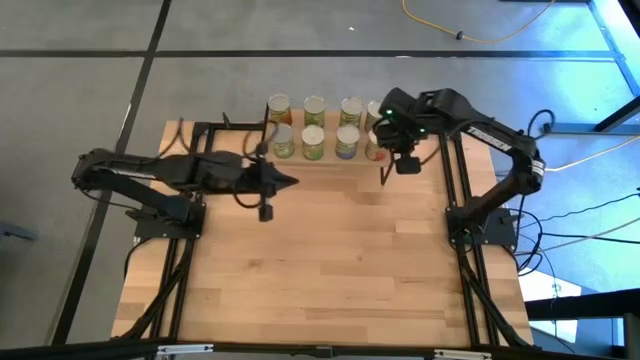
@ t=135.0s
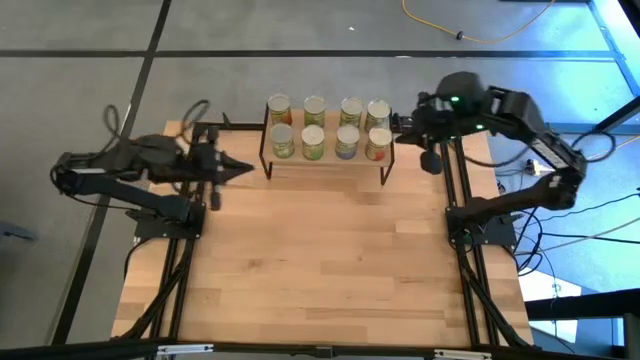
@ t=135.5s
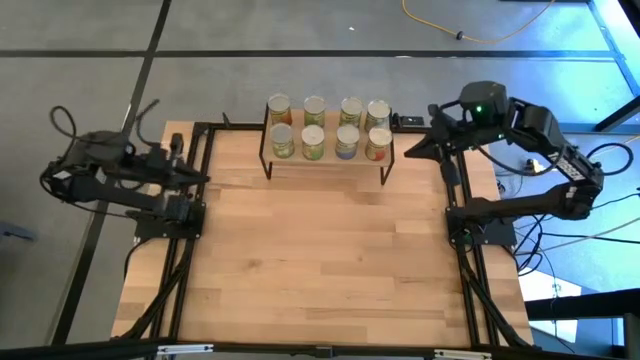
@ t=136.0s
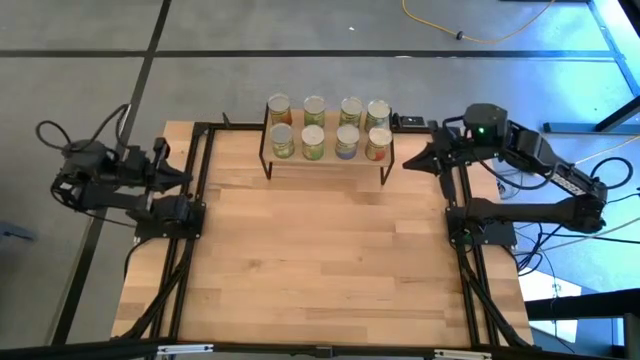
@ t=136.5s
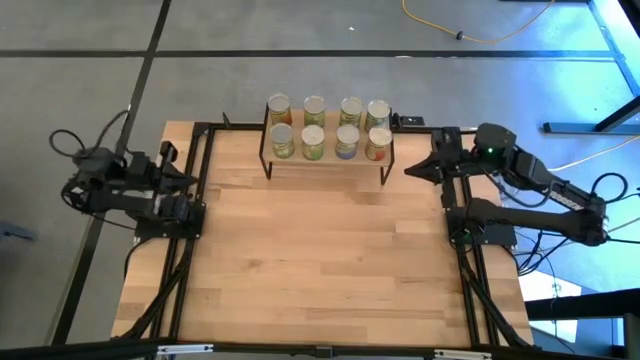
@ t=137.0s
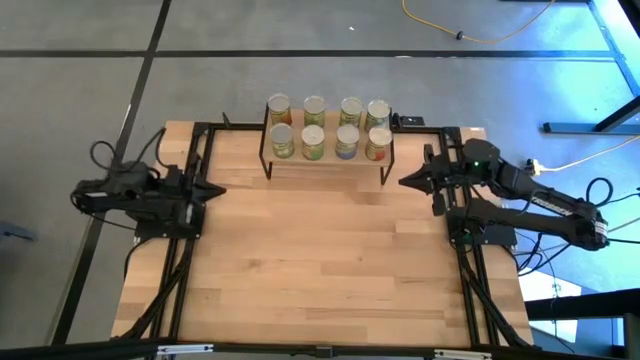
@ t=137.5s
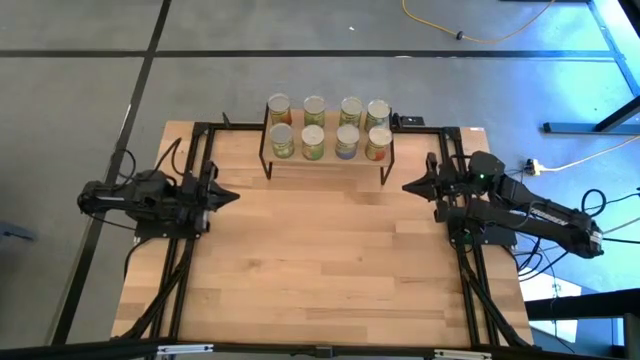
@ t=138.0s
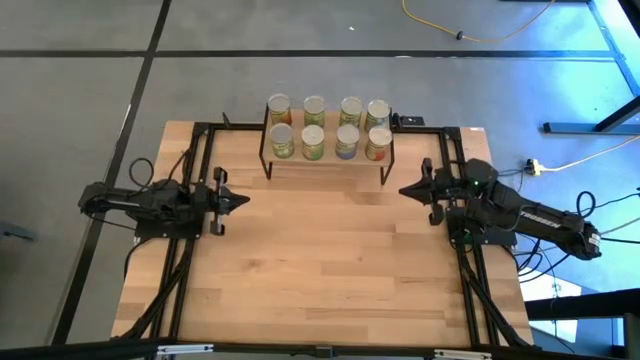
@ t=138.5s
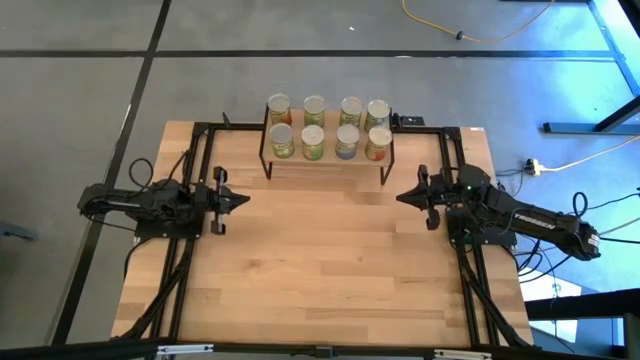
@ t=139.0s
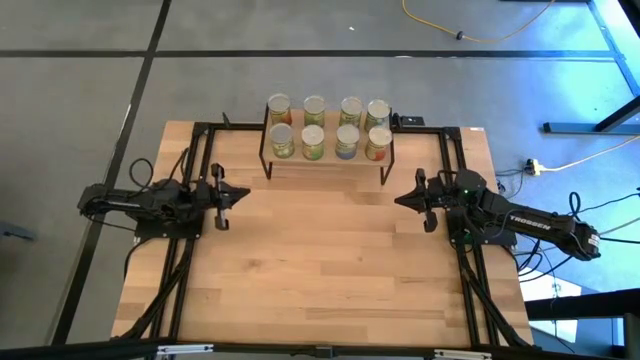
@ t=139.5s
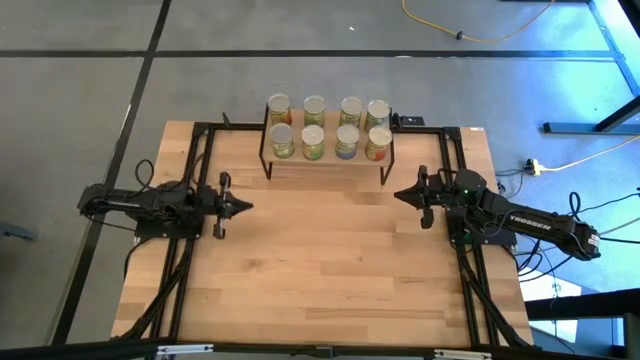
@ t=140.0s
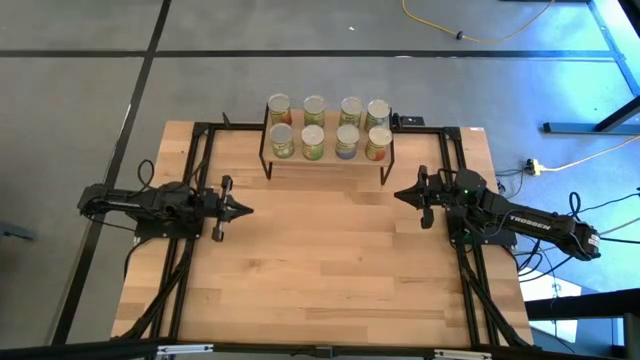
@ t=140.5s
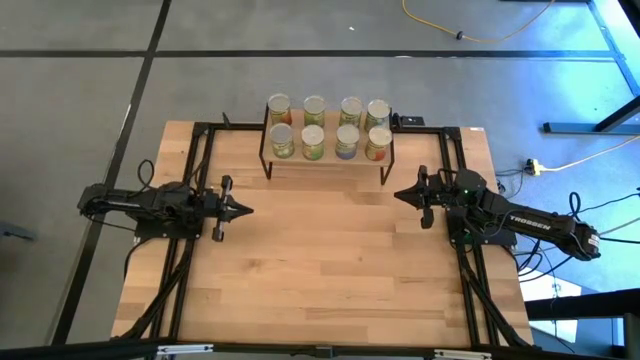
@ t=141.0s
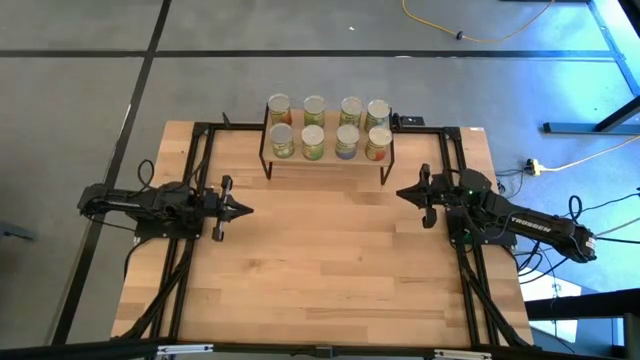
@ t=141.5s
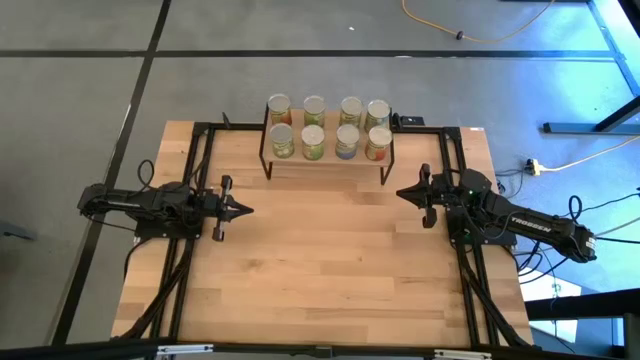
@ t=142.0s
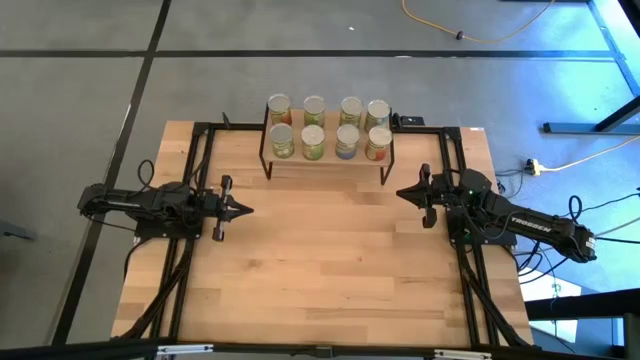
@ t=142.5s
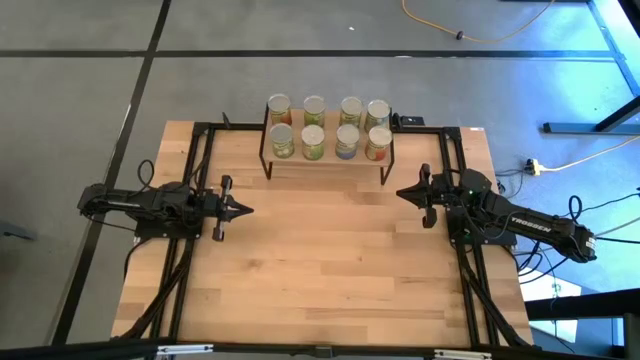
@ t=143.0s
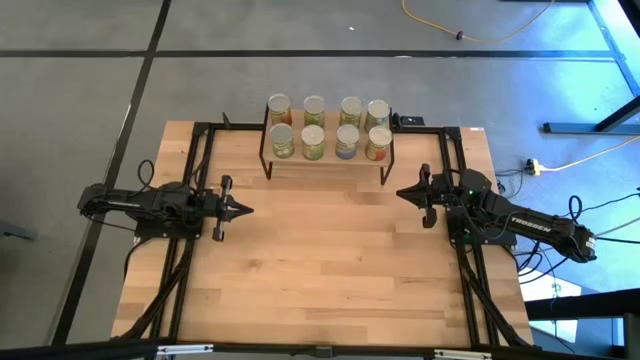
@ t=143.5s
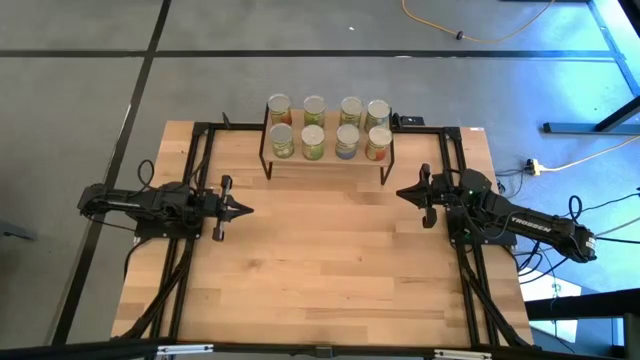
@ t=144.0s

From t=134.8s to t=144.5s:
Task: Pick and place cans onto a shelf
Return to Home Position

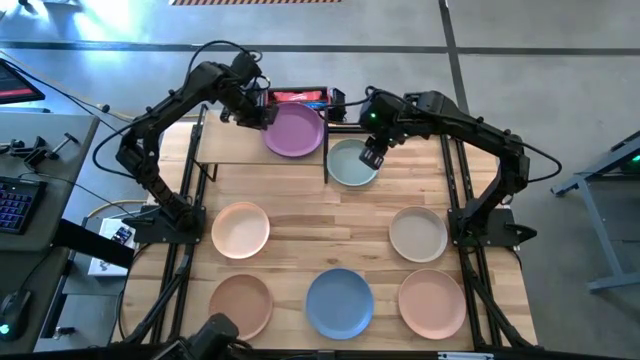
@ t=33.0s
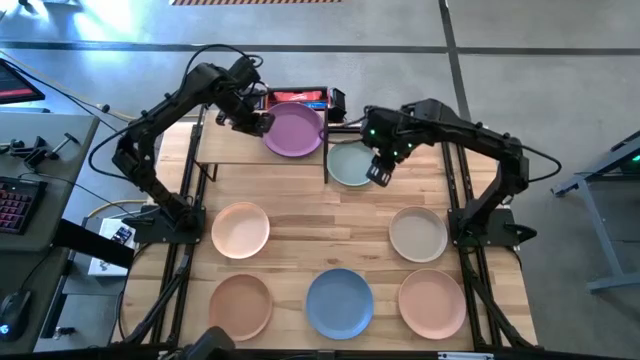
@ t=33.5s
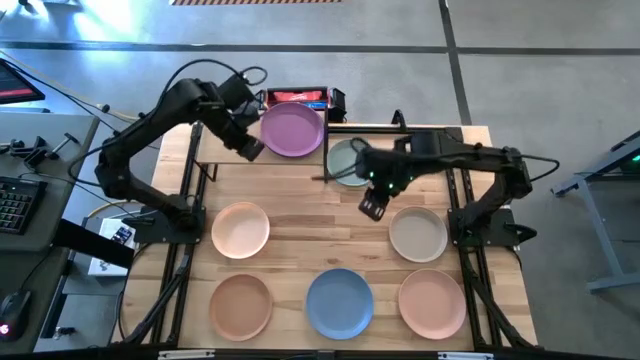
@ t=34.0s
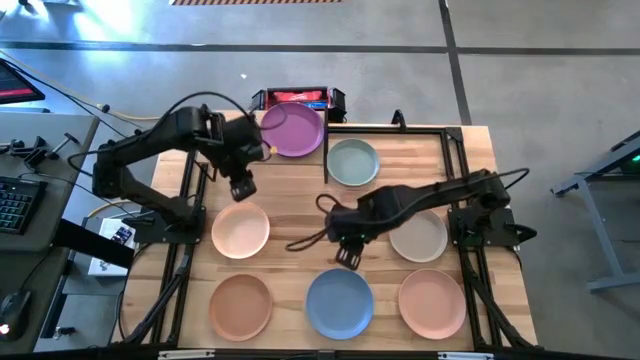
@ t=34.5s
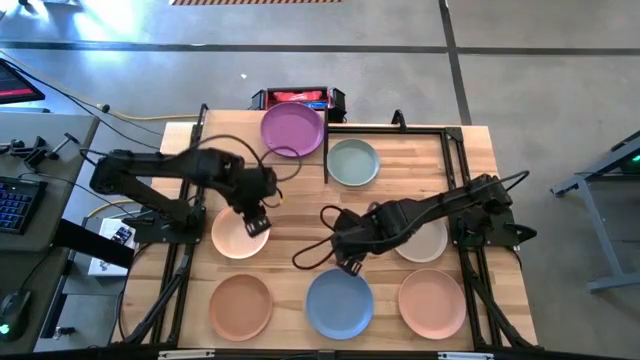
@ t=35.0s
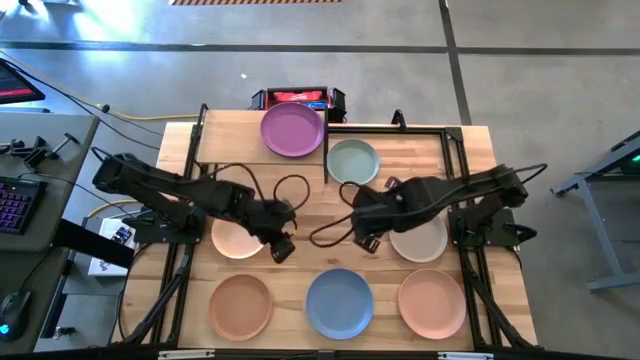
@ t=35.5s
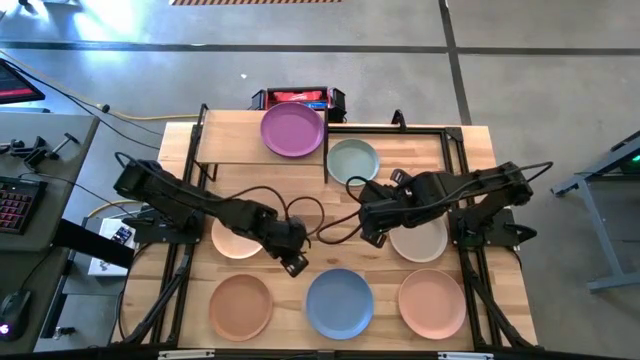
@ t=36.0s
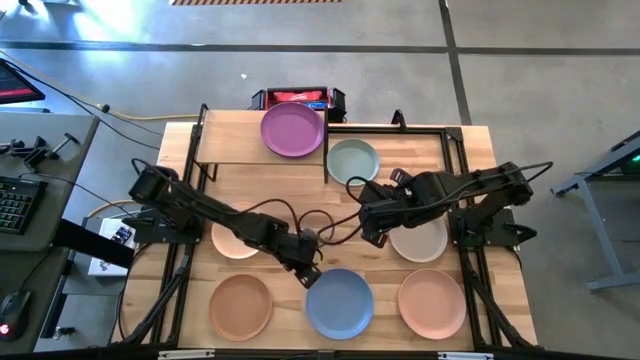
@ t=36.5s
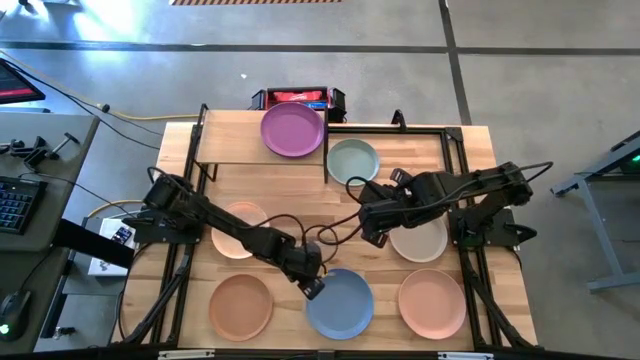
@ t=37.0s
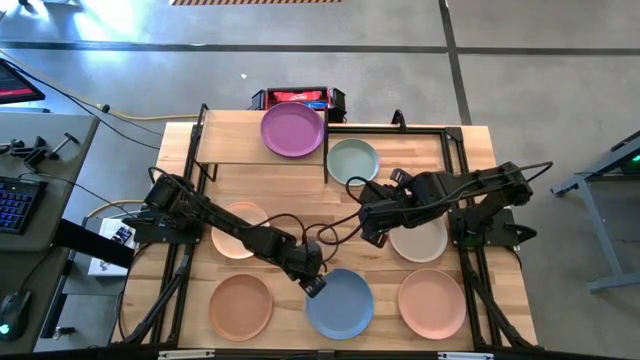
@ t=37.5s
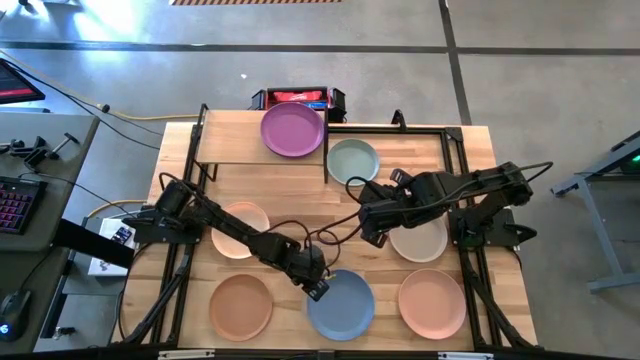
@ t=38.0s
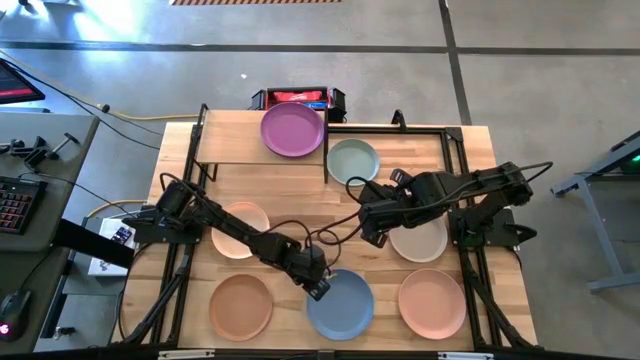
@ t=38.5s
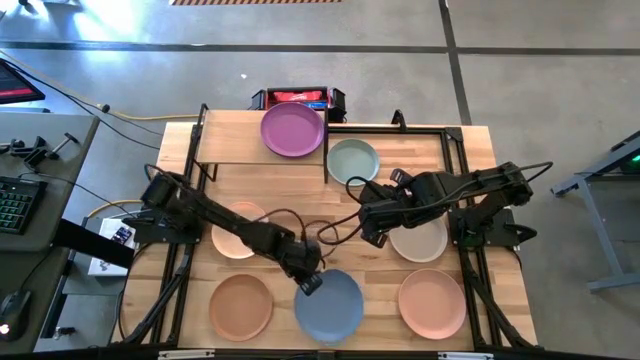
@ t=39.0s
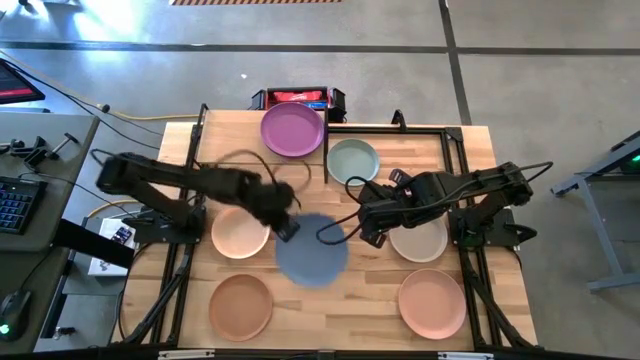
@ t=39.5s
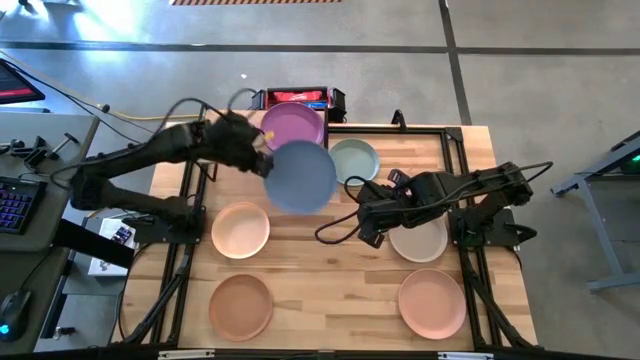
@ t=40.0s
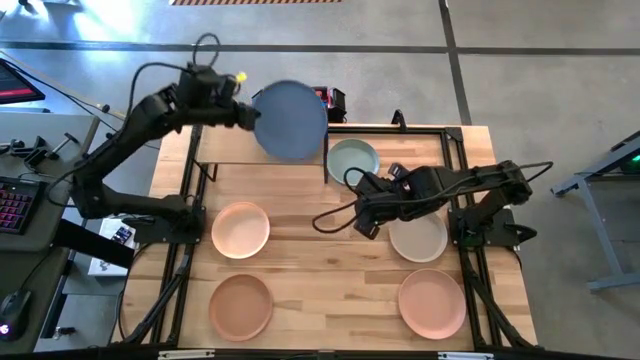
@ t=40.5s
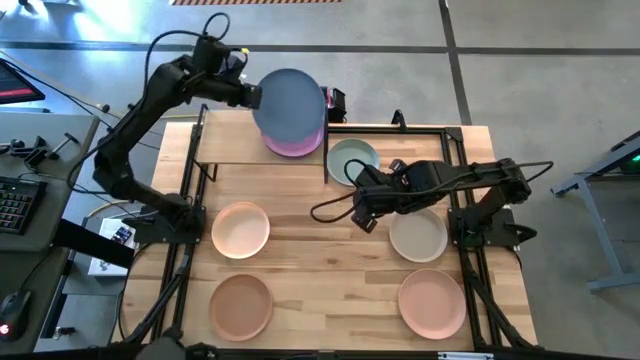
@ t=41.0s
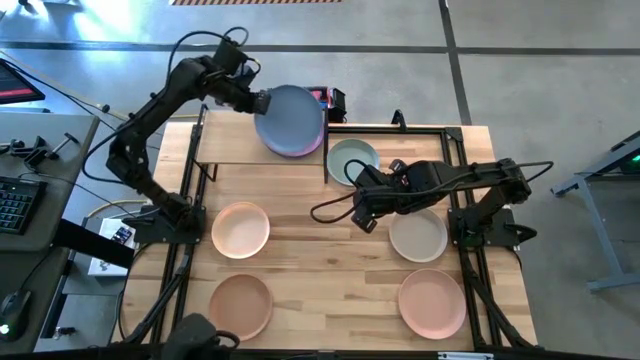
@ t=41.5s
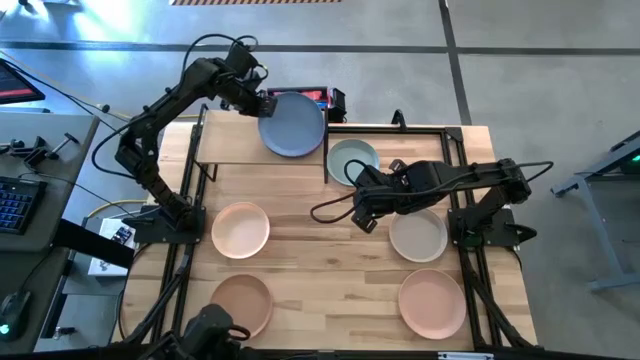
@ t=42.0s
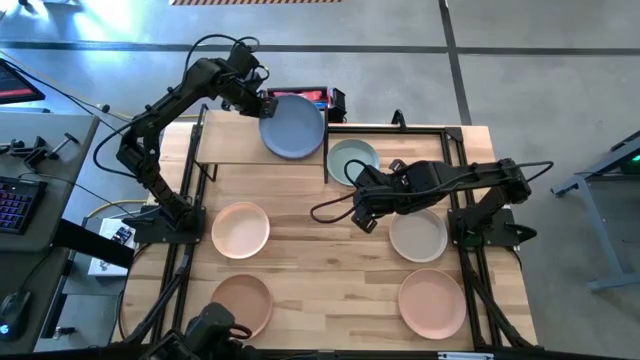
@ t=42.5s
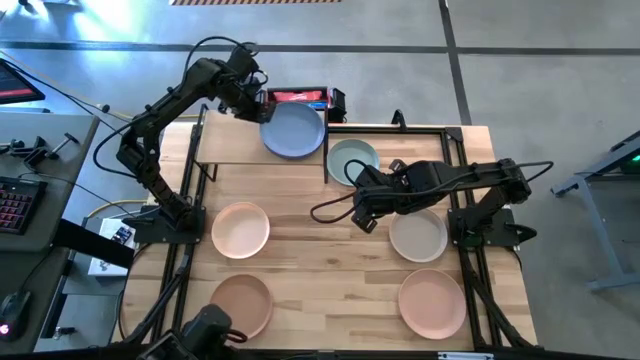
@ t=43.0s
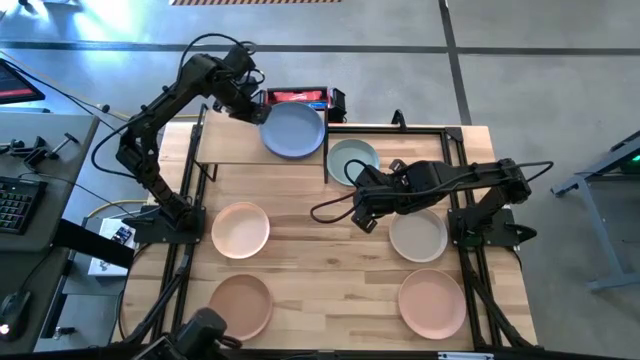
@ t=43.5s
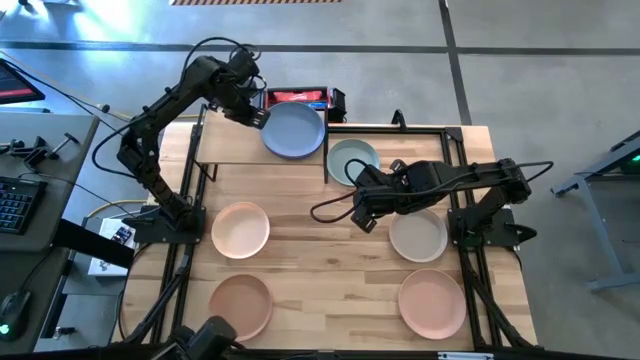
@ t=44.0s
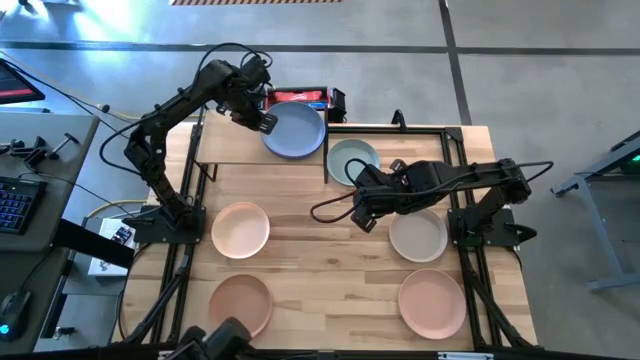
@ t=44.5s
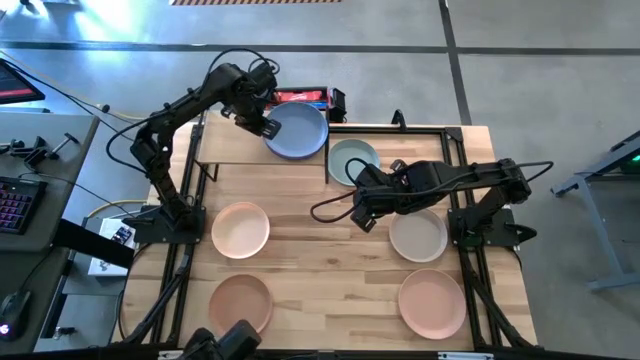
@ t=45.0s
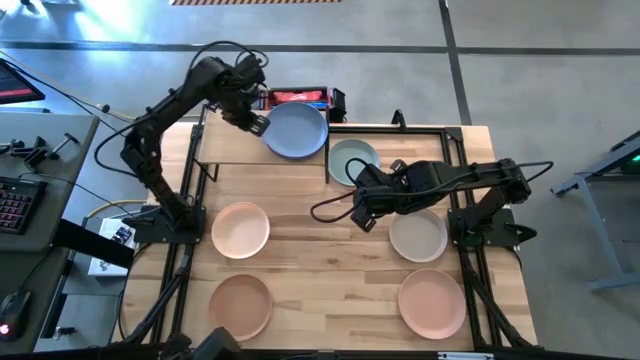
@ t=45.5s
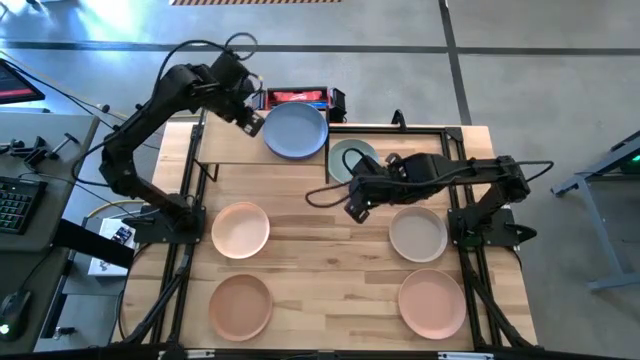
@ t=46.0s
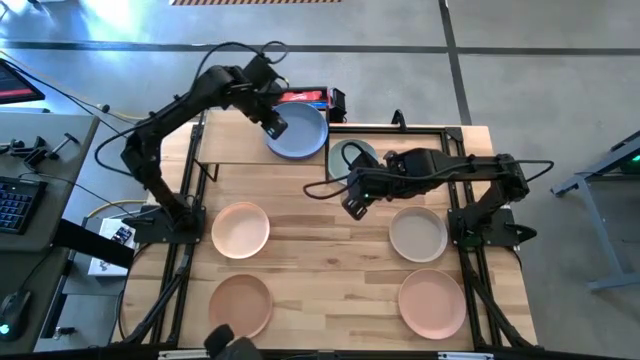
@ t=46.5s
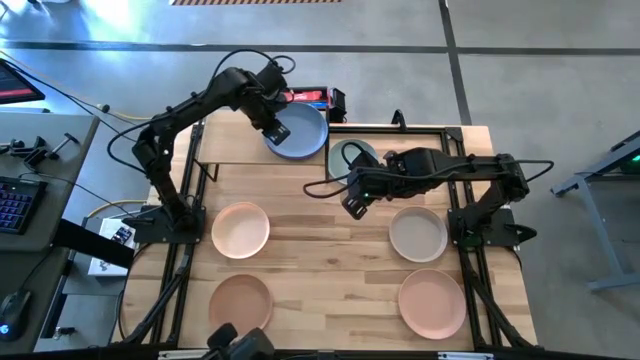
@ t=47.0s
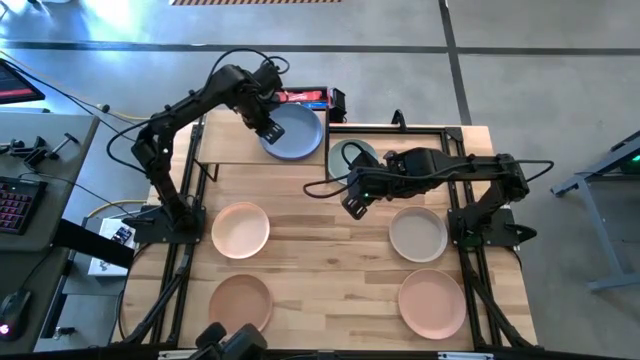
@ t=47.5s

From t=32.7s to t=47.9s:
Task: Place and stack plates onto a shelf
Stack the blue plate on top of the violet plate on the shelf
